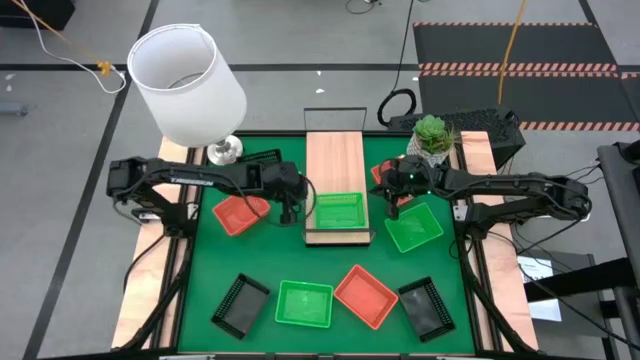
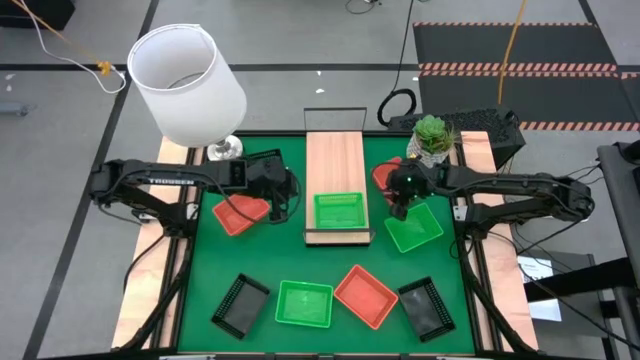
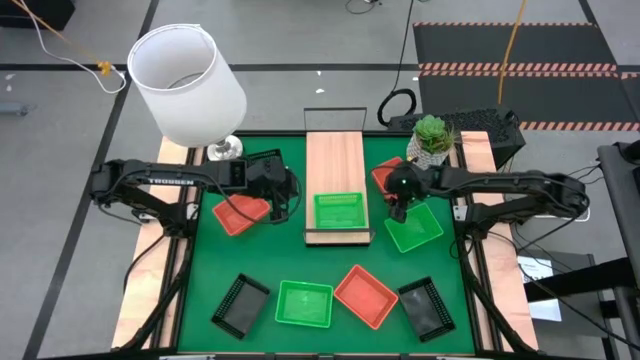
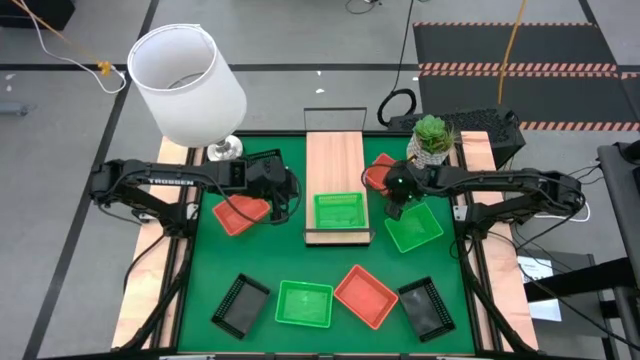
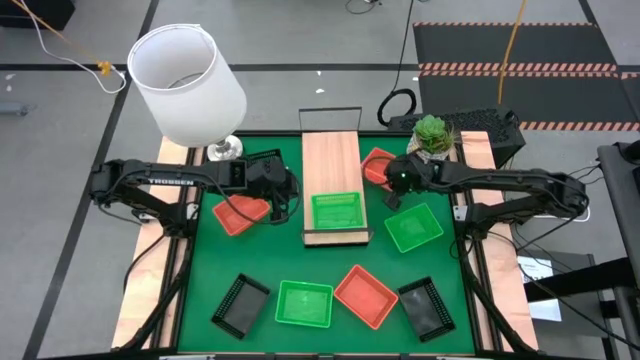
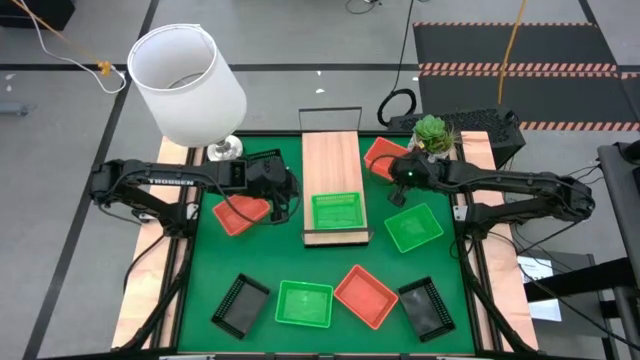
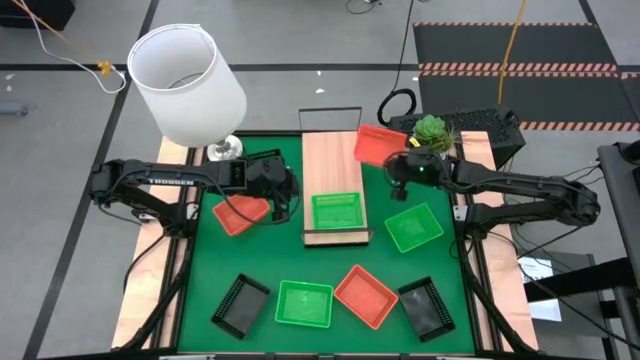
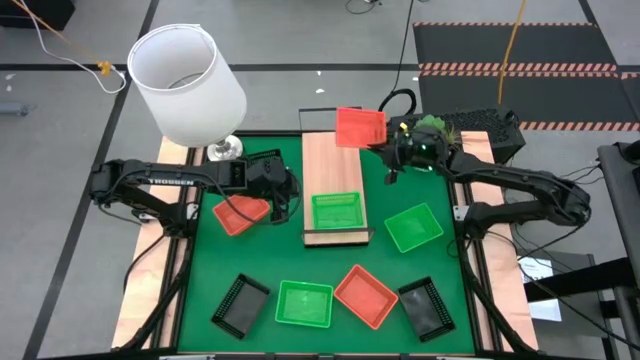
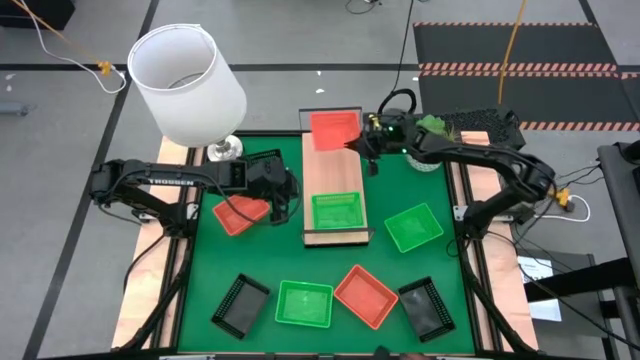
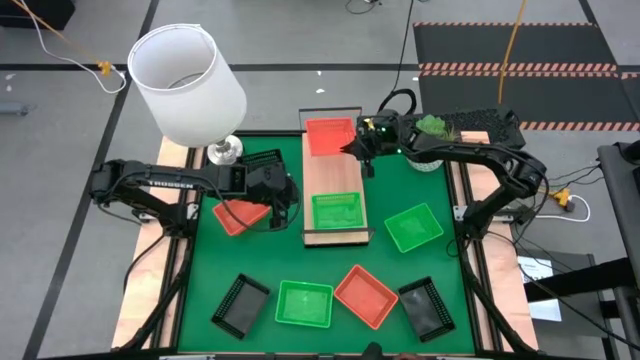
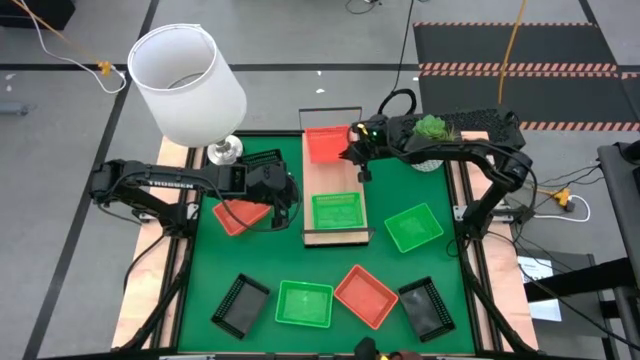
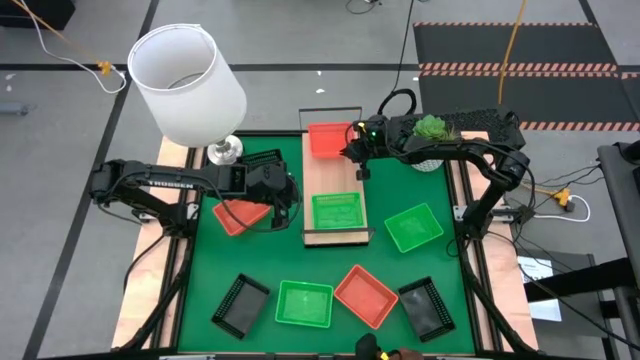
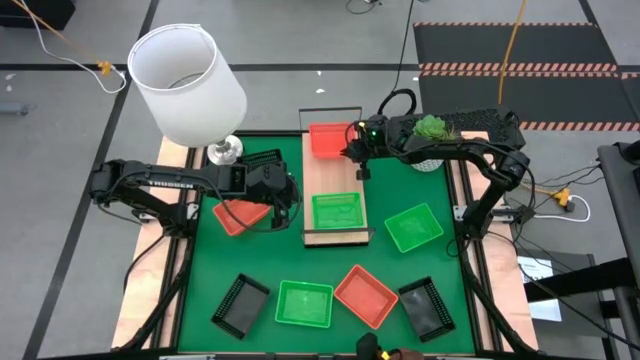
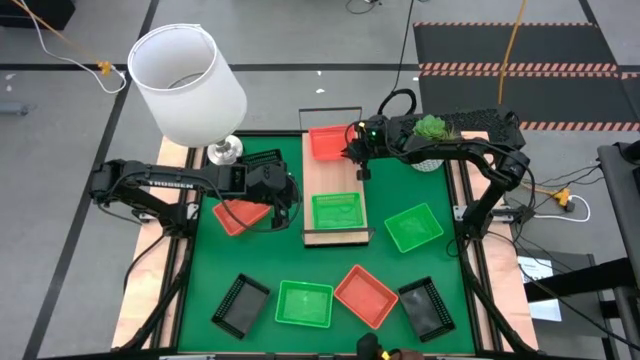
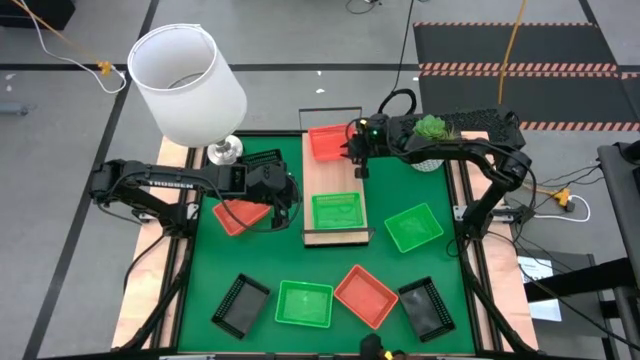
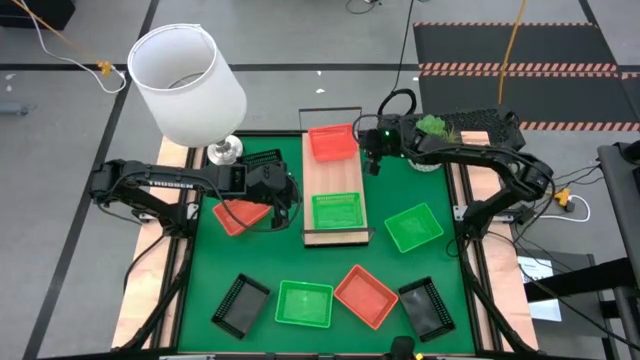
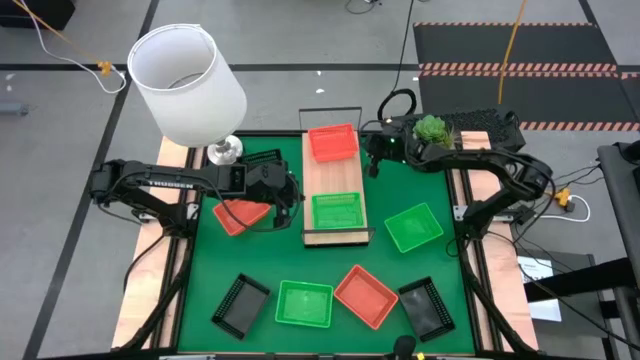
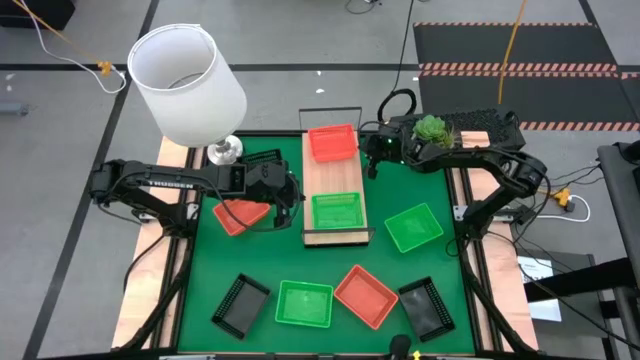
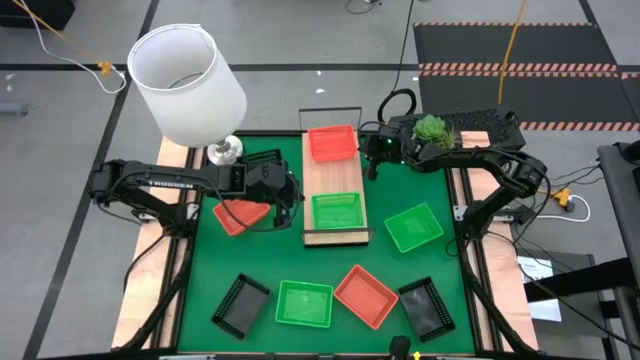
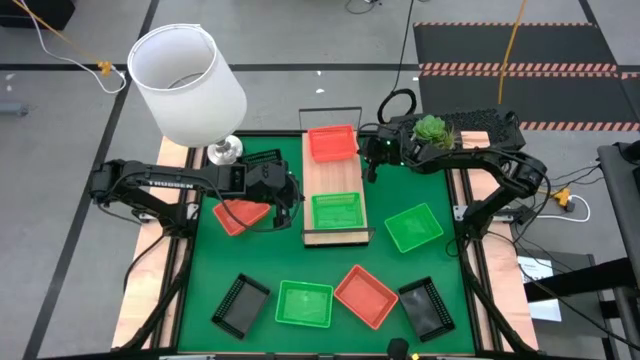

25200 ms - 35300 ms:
Task: Stack baskets on shelf by color
Put the top right orange bin on the shelf

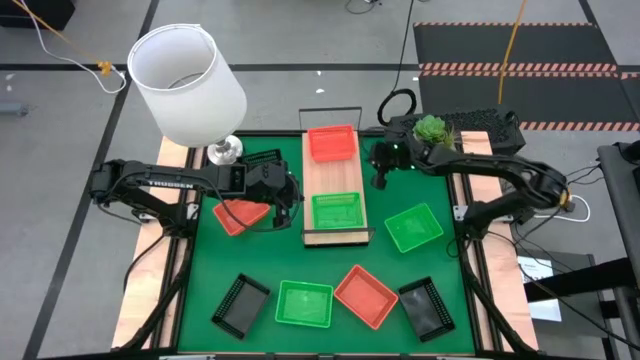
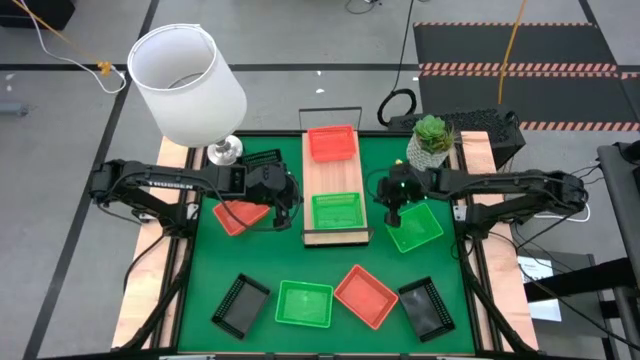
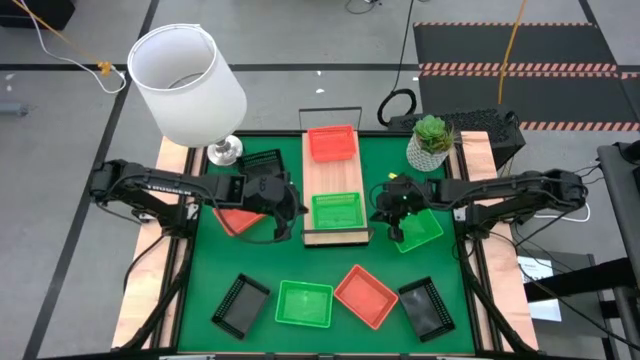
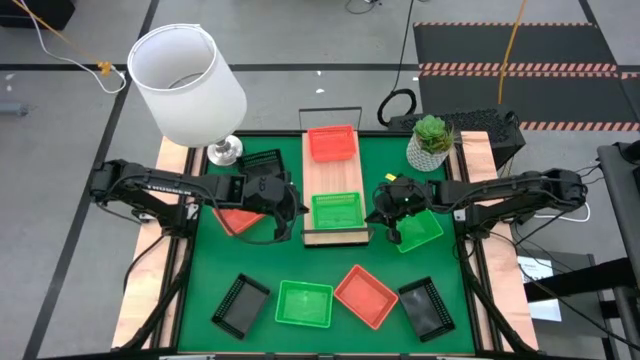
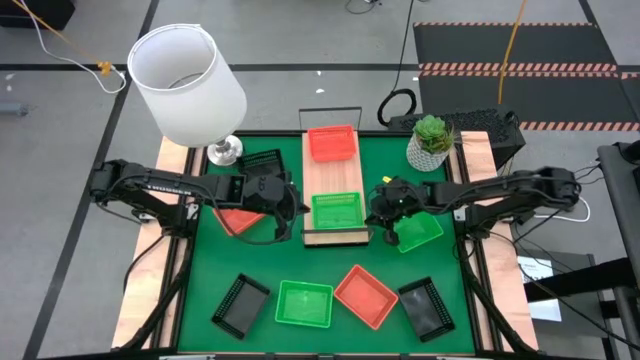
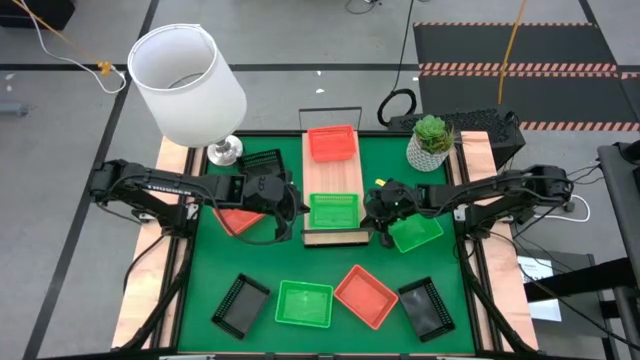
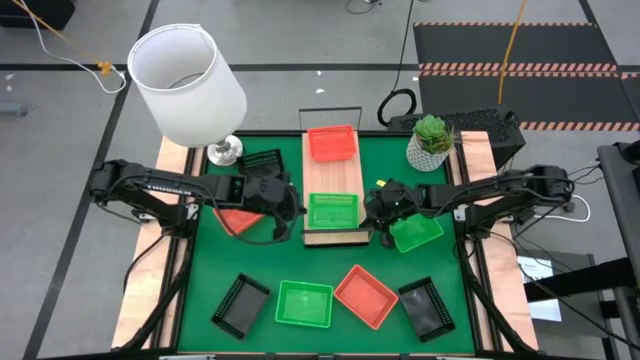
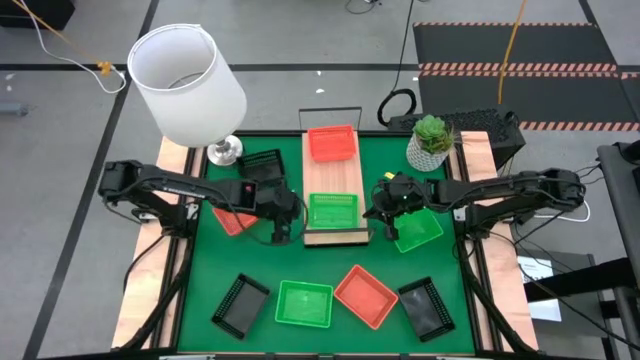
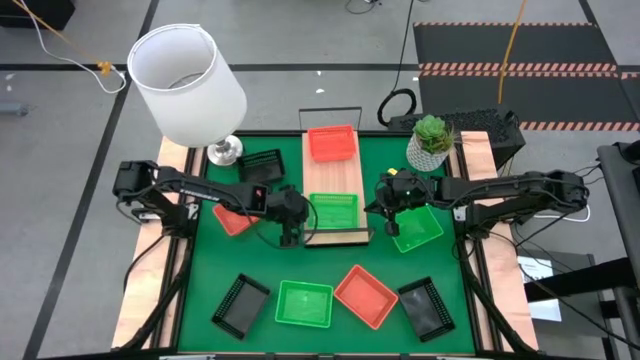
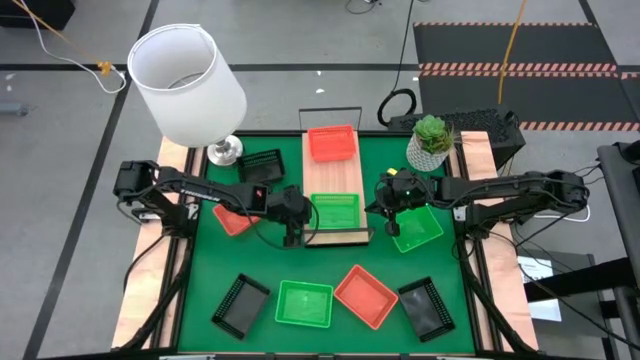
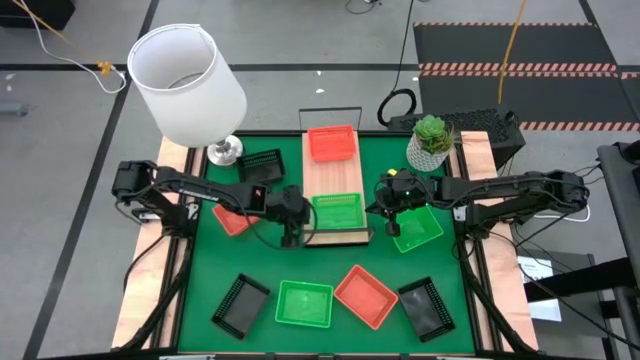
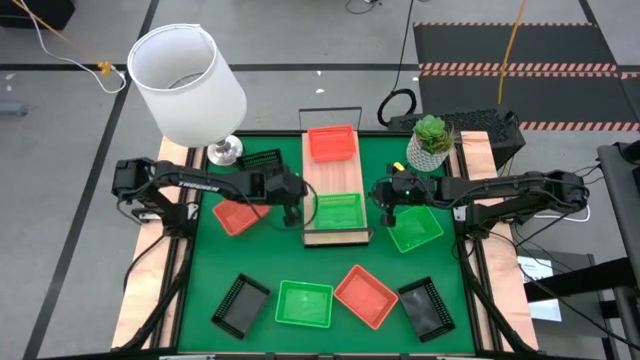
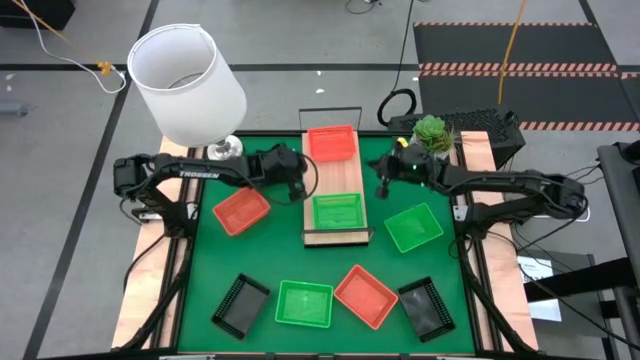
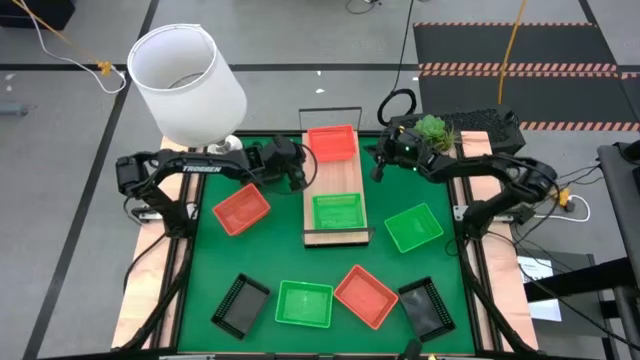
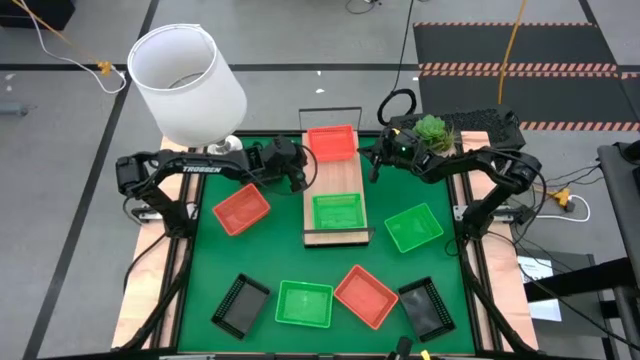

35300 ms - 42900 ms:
Adjust the bins on the shelf

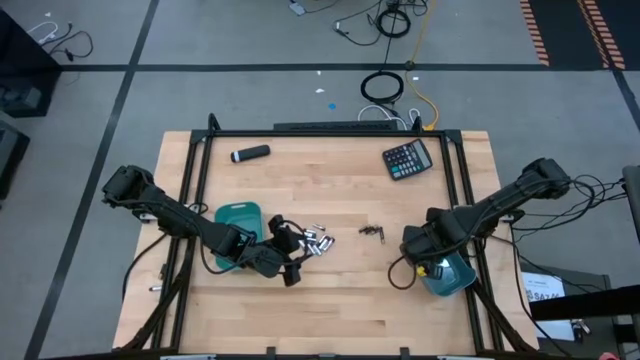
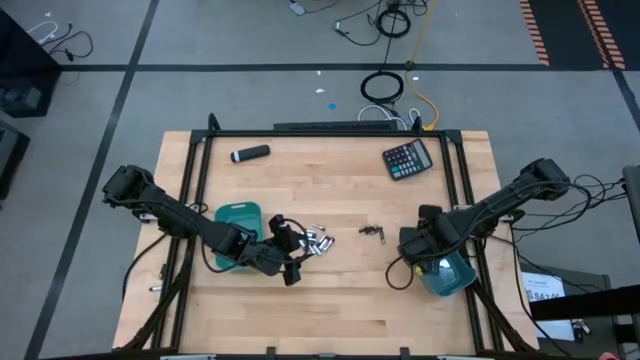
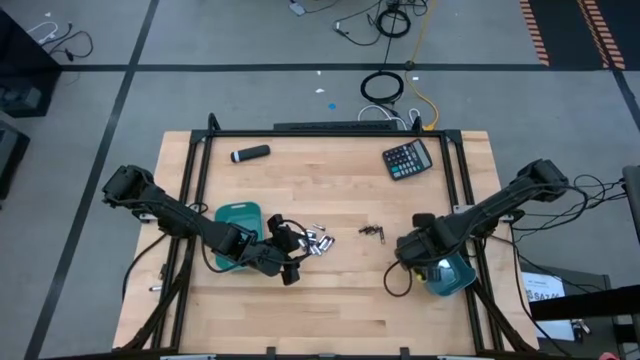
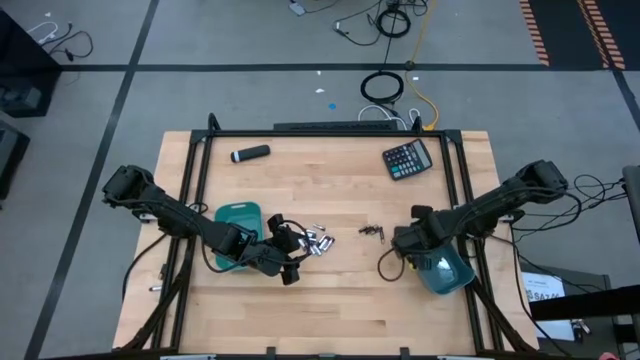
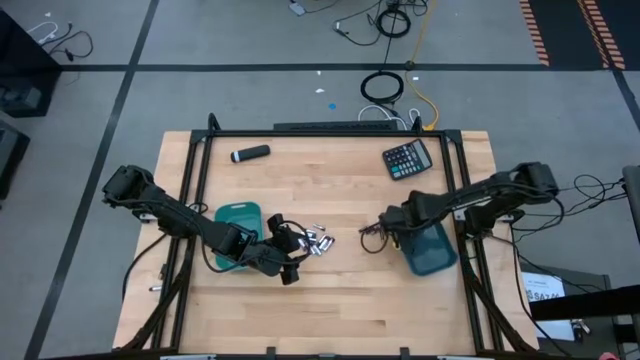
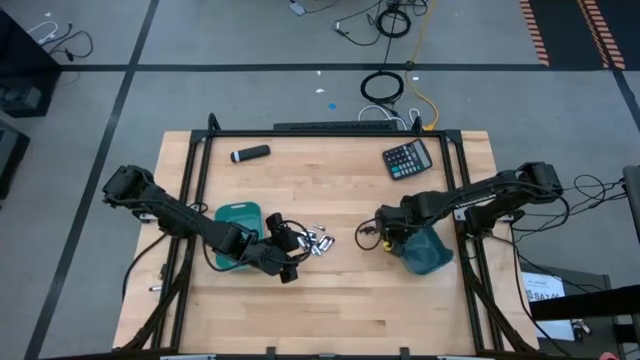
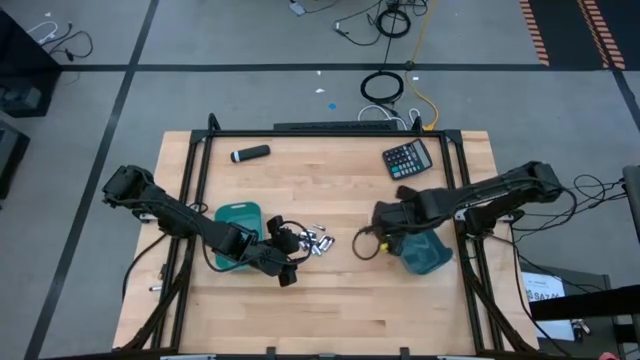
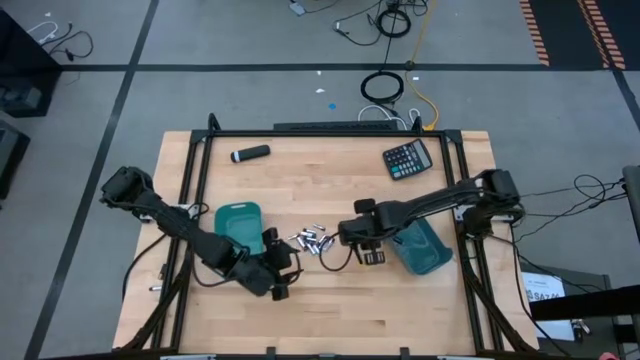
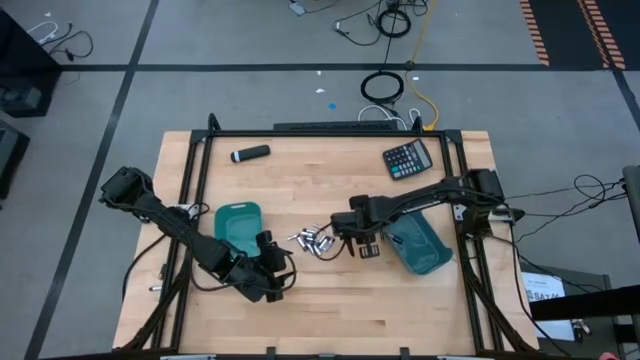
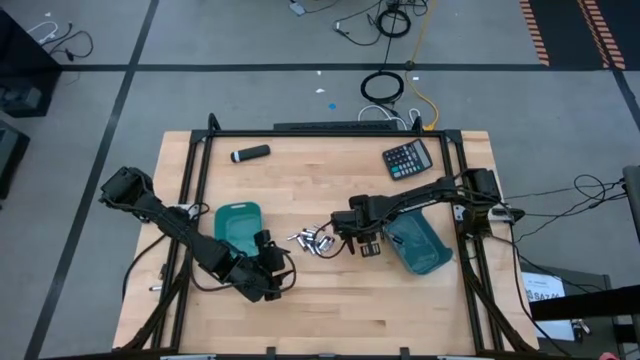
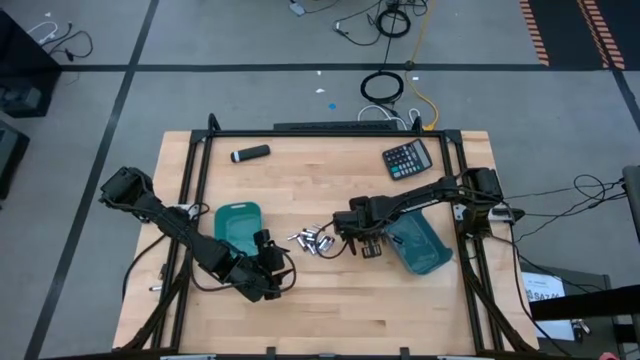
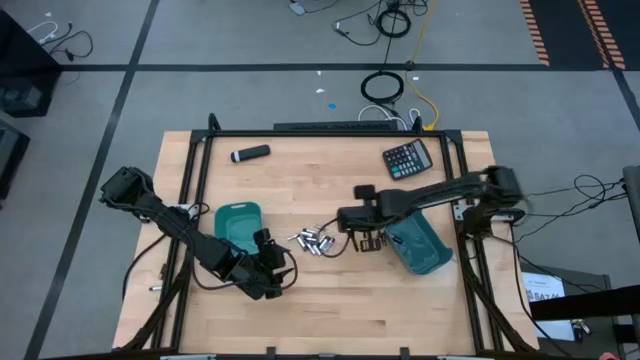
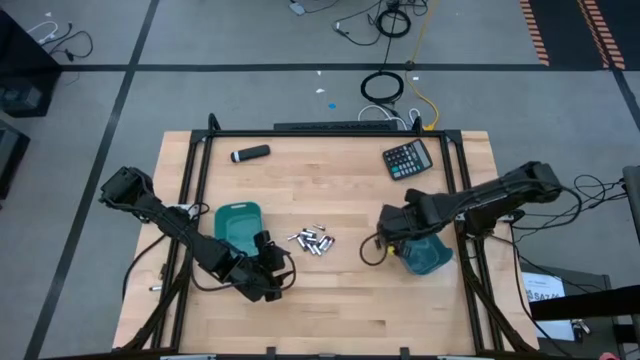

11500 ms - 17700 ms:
Task: Sort batteries
Put the black battery into the blue bin
